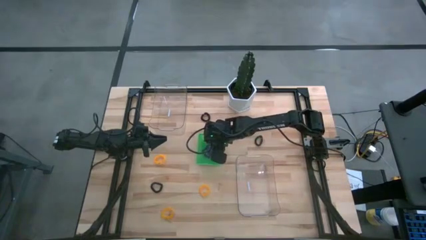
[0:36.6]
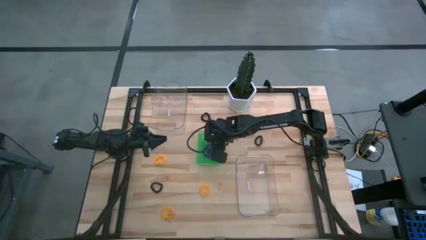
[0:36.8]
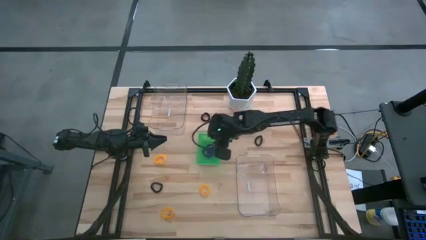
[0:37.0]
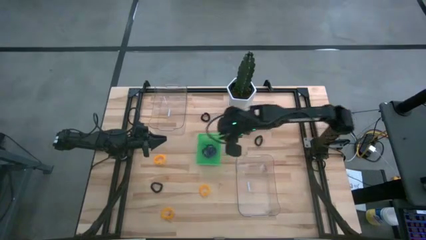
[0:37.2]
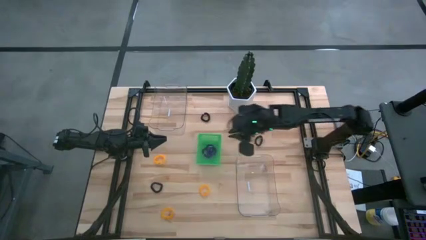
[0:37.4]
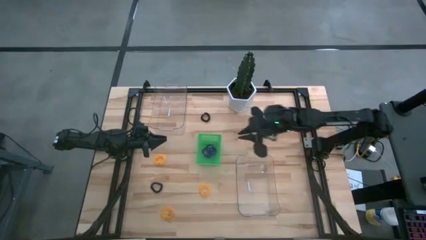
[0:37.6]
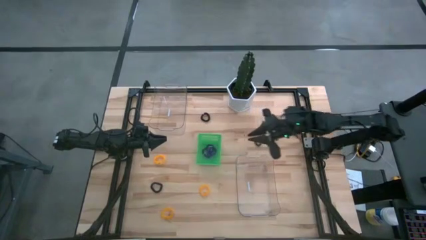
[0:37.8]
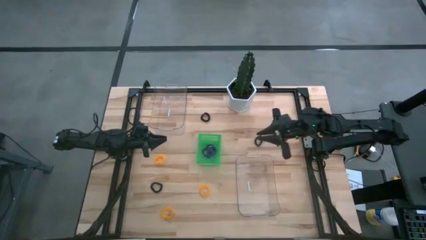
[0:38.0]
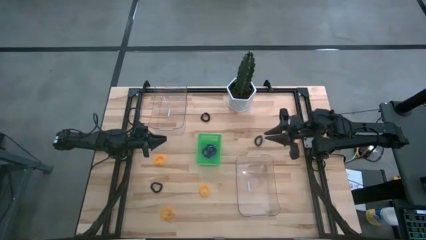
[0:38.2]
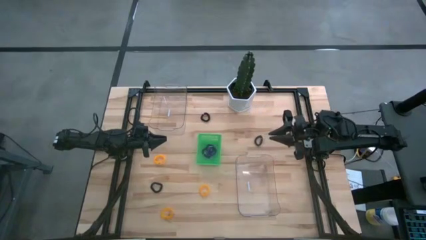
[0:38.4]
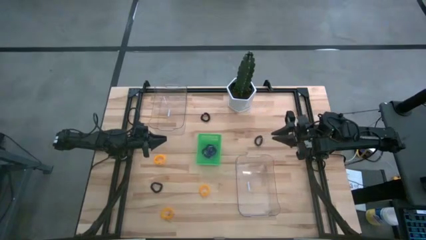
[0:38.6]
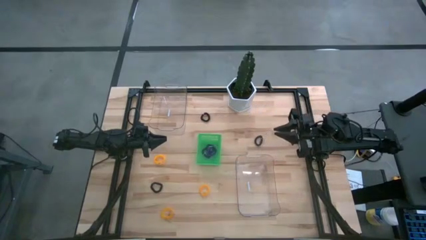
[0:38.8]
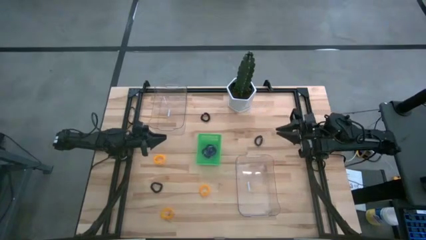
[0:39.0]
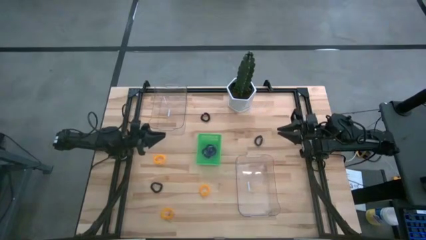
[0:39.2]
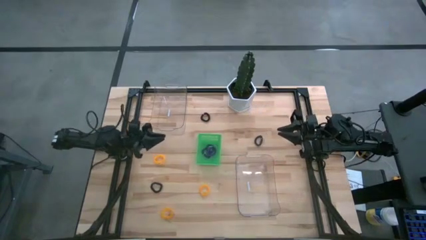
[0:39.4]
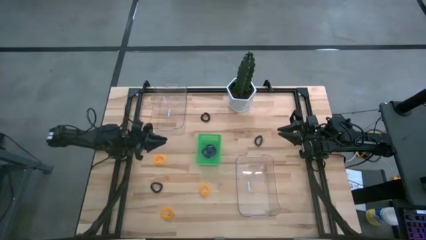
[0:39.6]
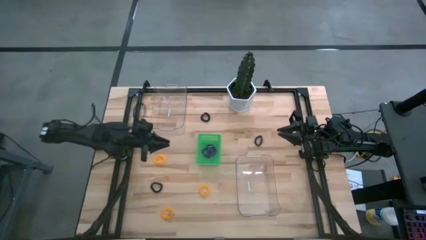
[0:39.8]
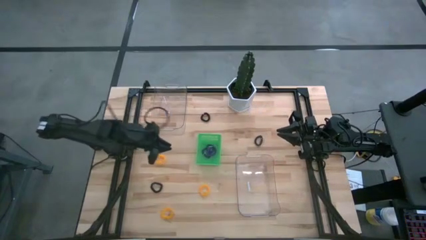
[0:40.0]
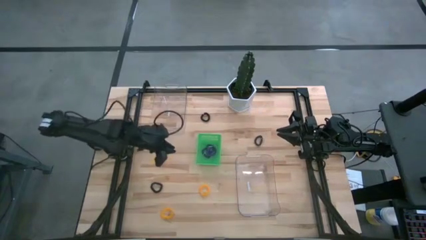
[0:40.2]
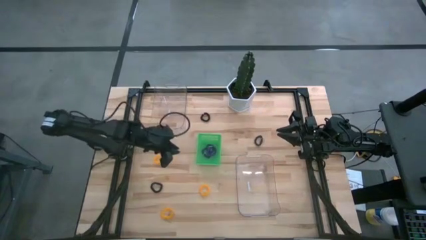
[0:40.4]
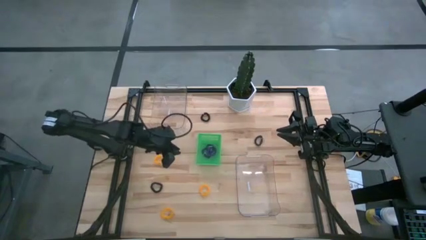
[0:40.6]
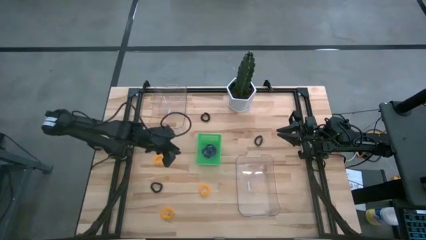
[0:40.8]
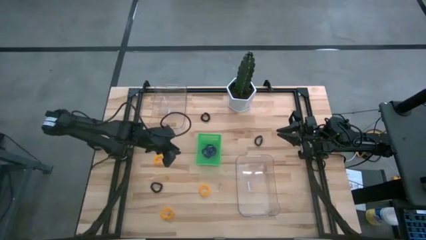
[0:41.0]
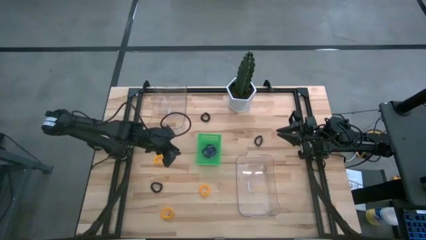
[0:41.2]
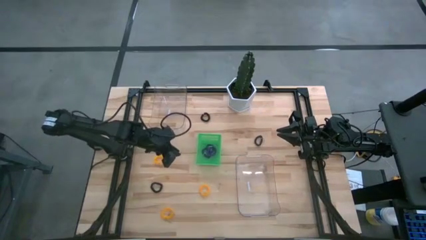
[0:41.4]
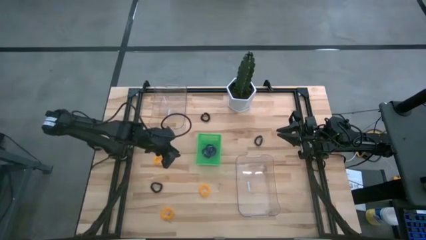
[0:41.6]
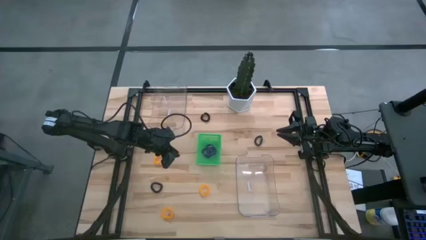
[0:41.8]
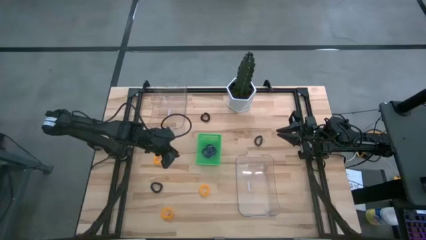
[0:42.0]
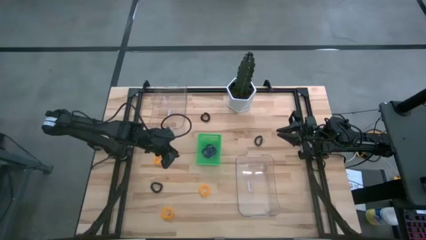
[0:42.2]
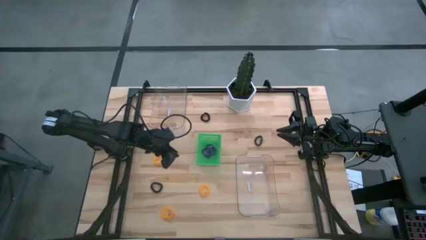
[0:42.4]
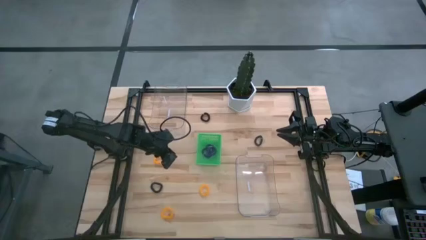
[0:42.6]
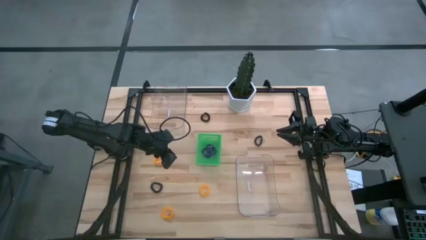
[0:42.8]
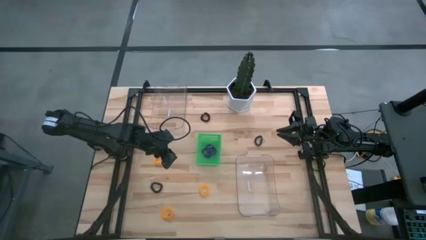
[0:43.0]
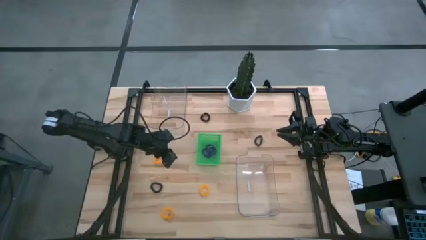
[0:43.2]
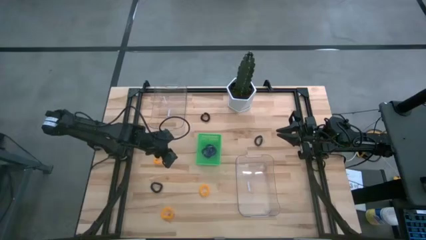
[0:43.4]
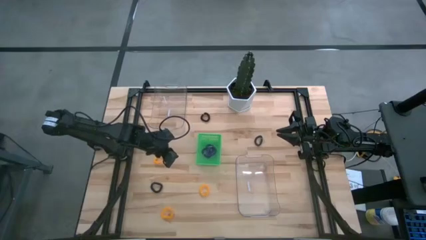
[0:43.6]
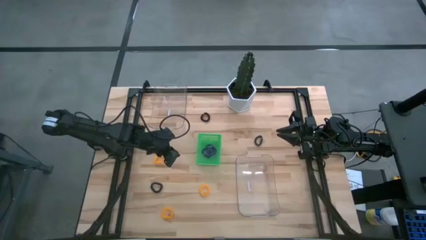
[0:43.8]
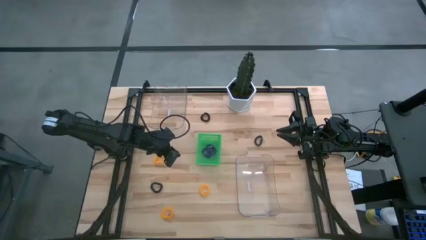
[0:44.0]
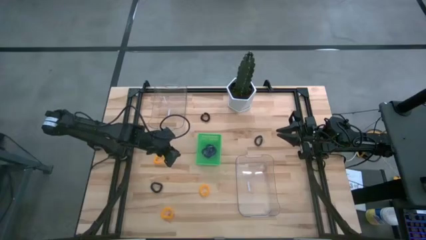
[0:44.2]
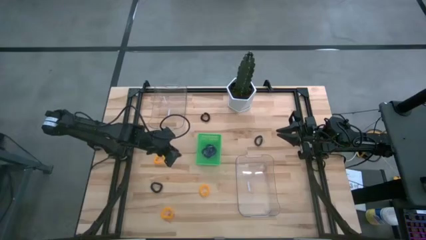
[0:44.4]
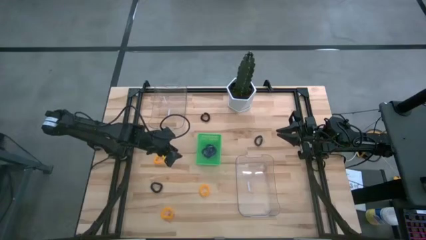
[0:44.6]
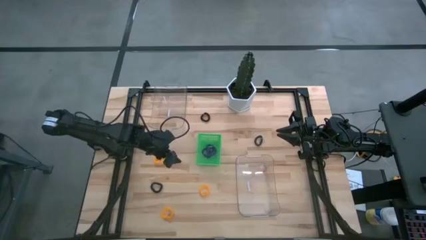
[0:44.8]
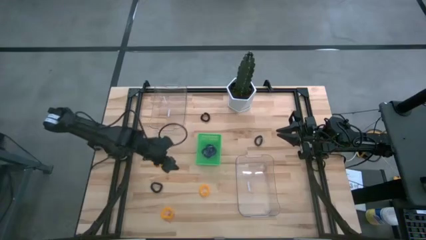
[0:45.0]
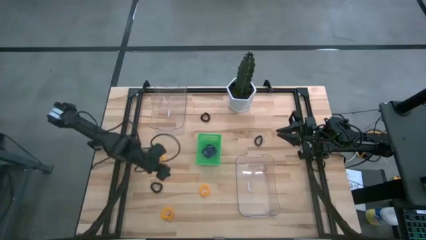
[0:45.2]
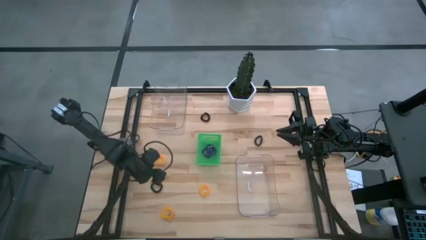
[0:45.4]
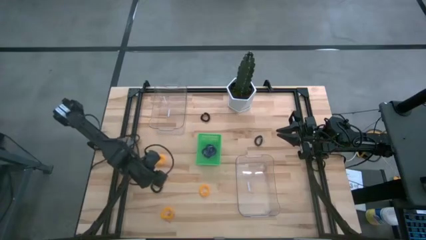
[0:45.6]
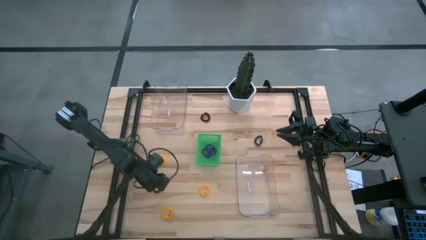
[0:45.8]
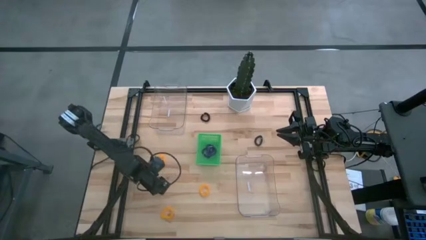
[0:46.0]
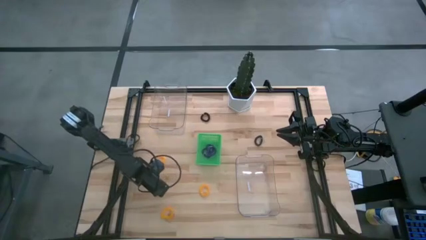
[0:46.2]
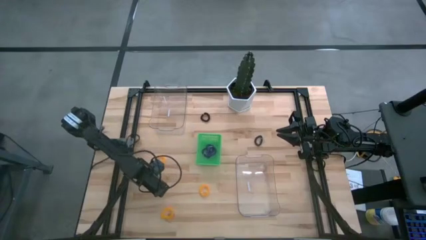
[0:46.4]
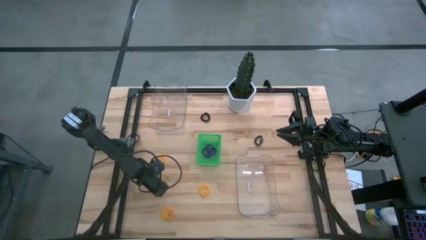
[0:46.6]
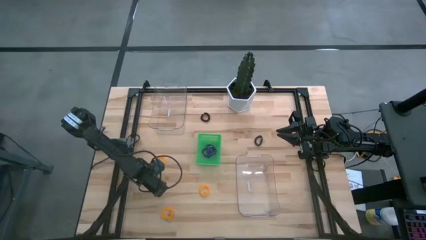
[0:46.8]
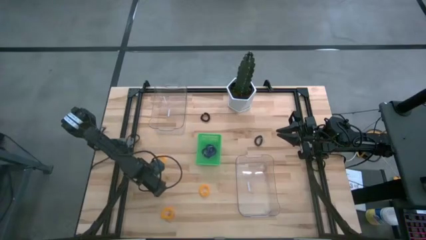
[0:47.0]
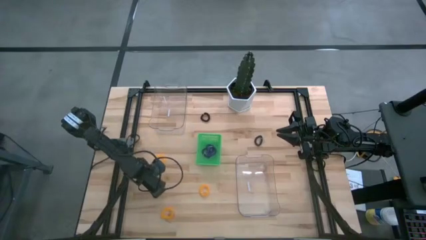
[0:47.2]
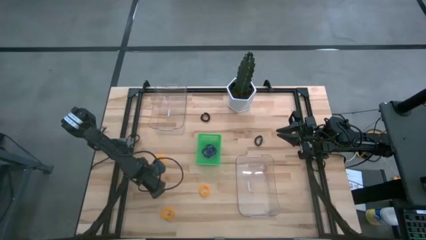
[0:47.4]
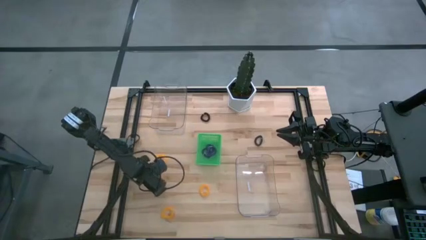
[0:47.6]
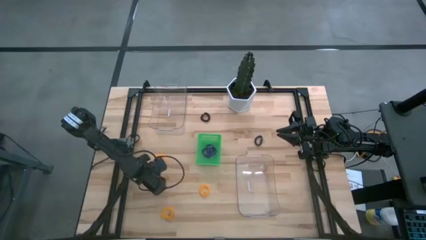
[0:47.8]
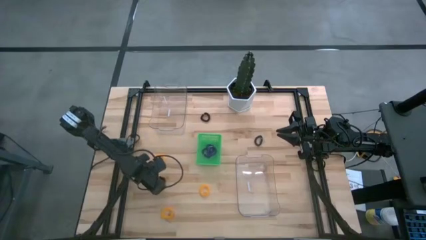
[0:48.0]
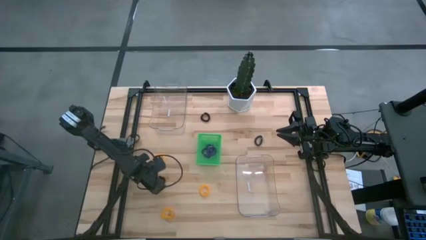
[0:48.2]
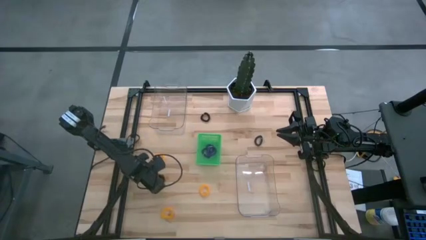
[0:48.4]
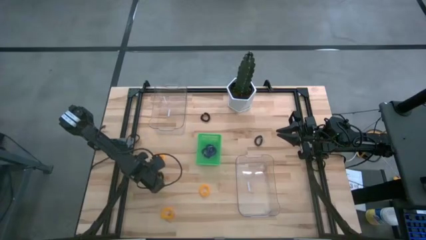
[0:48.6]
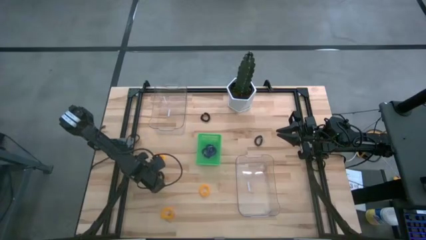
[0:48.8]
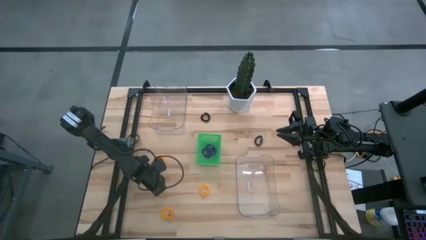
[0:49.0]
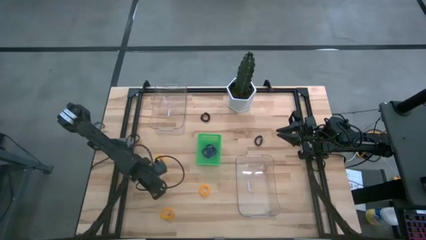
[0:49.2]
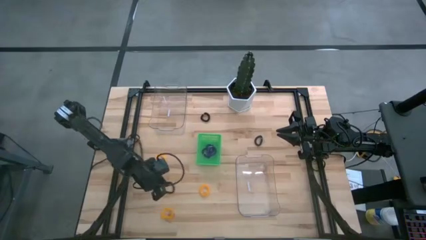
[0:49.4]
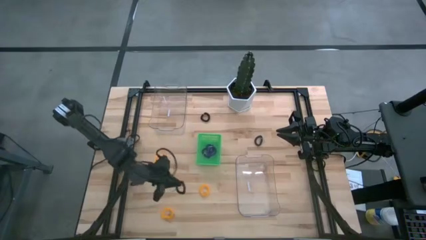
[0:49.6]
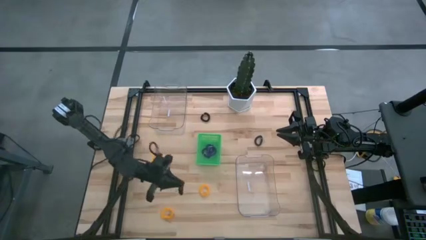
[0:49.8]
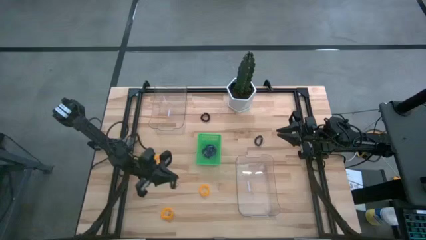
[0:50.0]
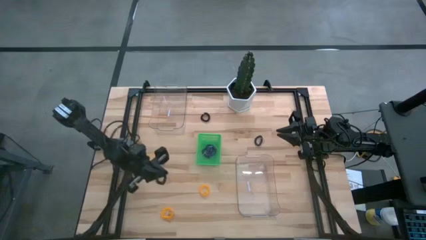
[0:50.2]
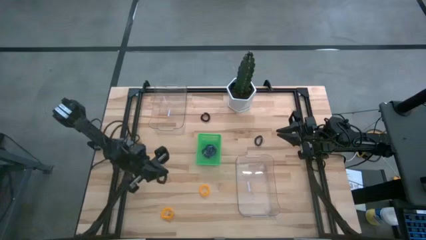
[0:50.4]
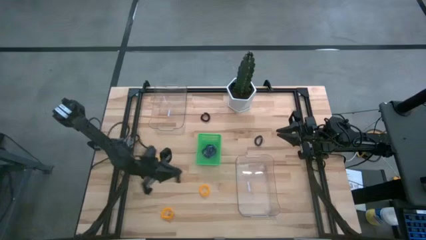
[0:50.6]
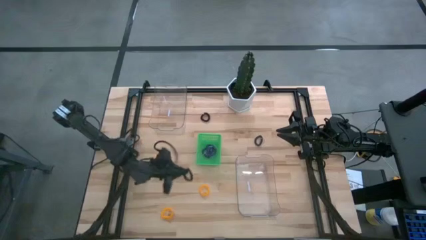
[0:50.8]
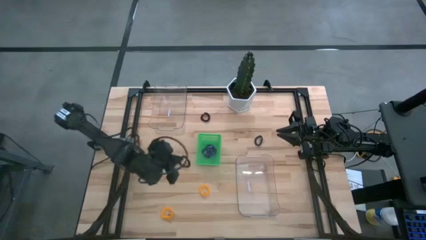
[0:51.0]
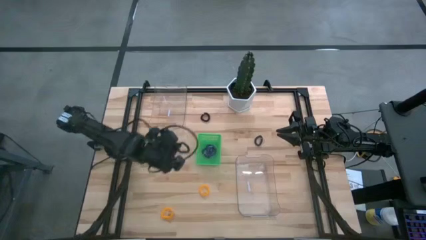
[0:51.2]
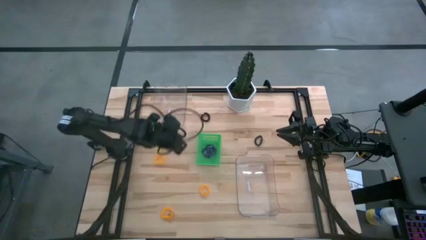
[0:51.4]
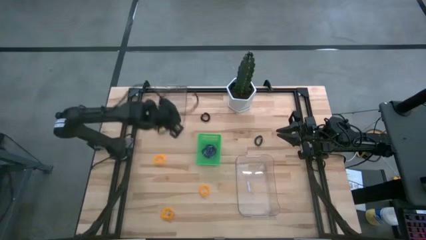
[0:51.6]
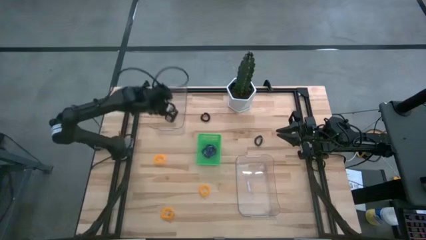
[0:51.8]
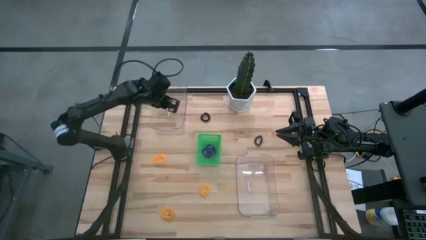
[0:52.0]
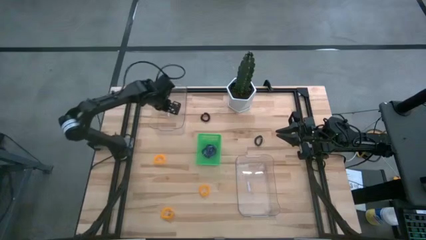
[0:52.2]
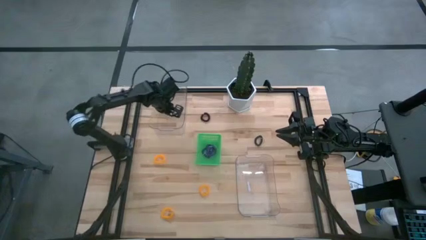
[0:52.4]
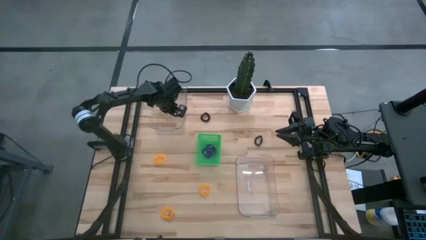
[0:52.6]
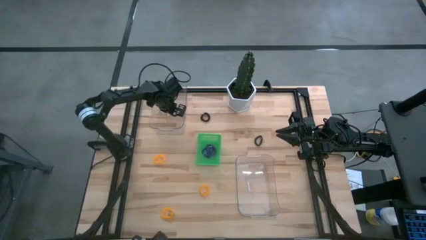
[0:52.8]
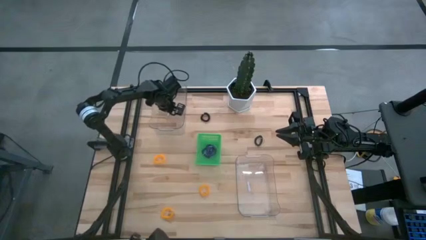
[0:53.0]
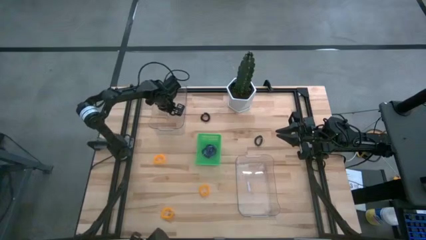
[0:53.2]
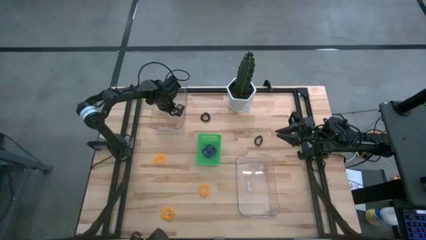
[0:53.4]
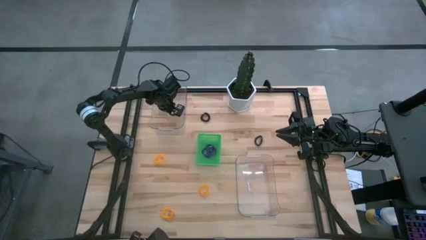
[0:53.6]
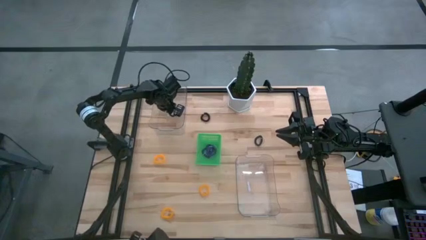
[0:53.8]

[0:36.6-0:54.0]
Task: Sort spring keychains
Put the bottom black spring keychain into the top transparent bin
